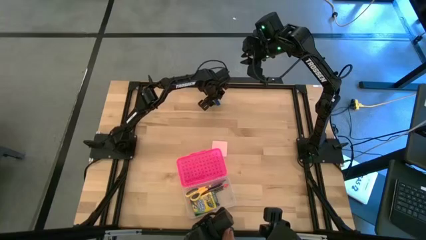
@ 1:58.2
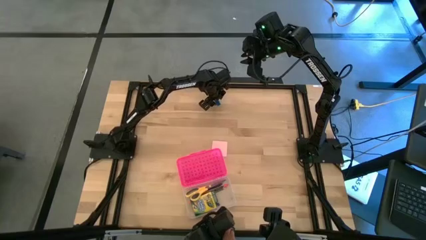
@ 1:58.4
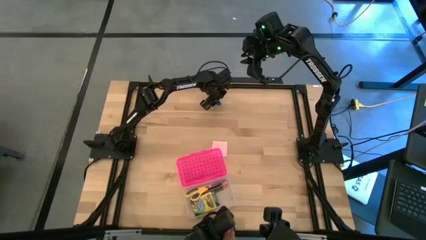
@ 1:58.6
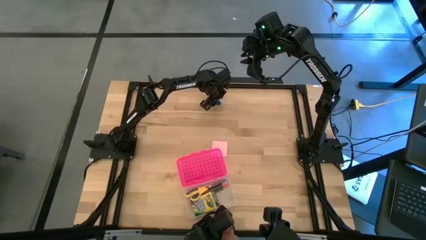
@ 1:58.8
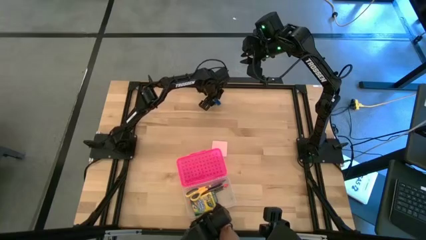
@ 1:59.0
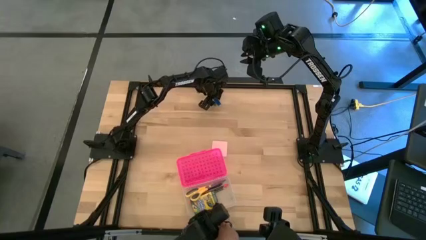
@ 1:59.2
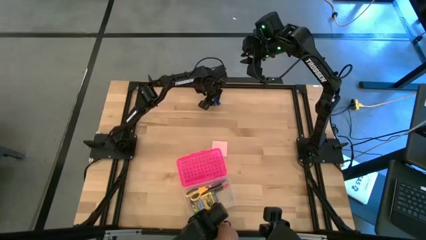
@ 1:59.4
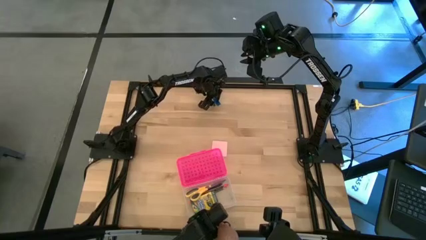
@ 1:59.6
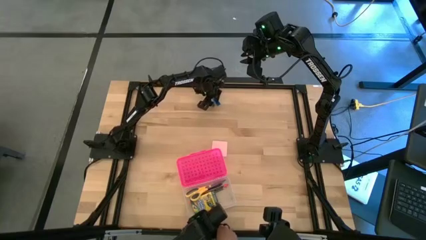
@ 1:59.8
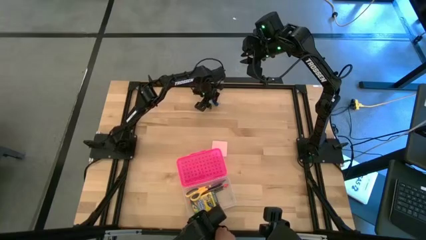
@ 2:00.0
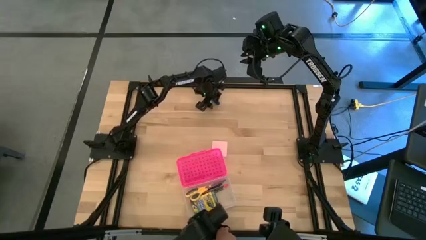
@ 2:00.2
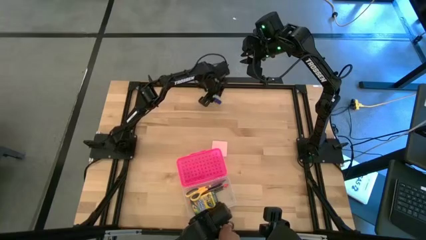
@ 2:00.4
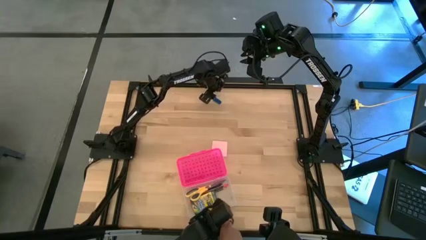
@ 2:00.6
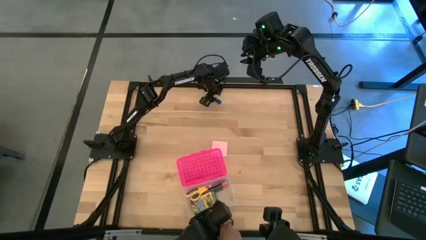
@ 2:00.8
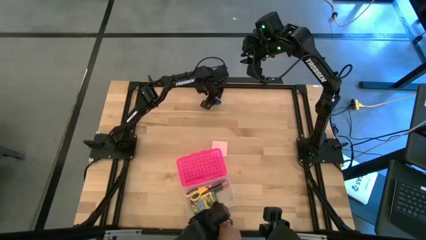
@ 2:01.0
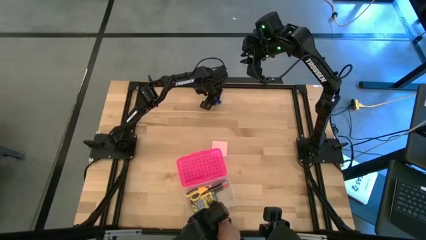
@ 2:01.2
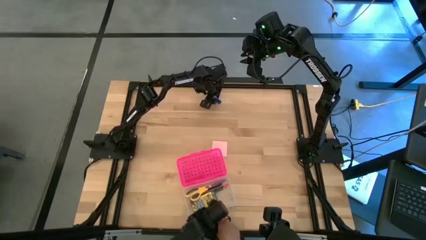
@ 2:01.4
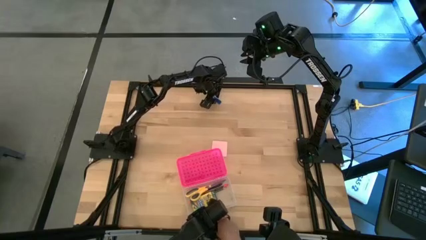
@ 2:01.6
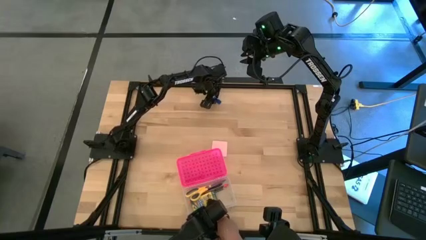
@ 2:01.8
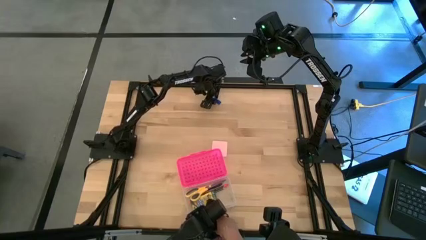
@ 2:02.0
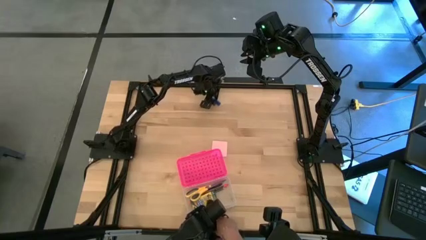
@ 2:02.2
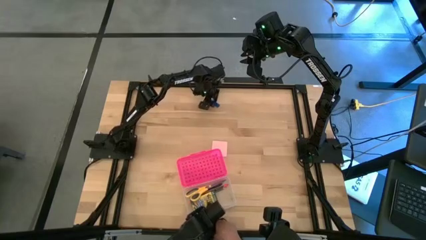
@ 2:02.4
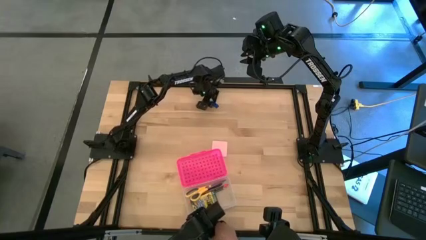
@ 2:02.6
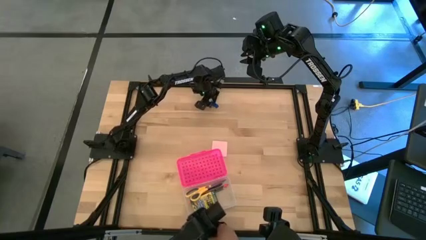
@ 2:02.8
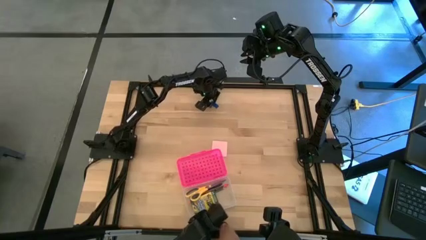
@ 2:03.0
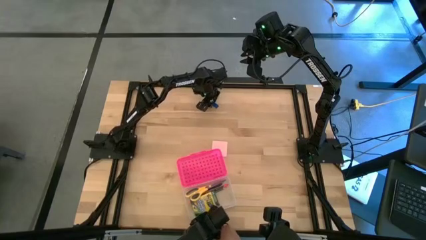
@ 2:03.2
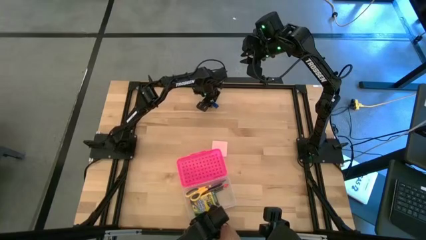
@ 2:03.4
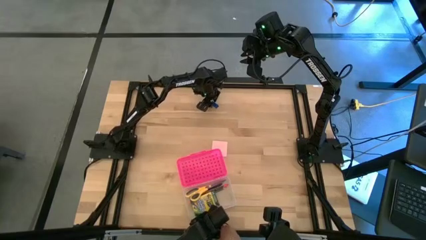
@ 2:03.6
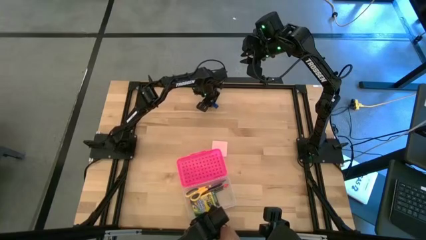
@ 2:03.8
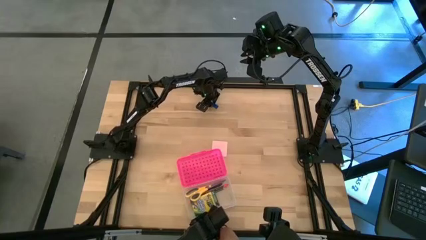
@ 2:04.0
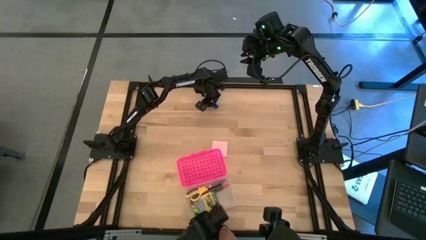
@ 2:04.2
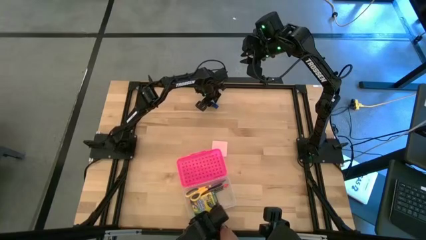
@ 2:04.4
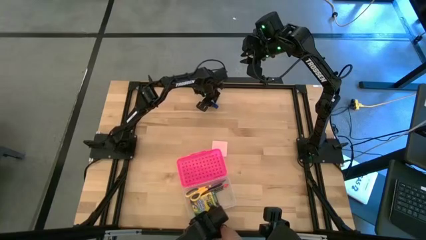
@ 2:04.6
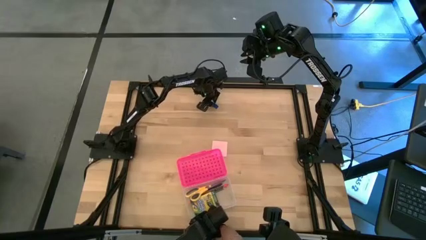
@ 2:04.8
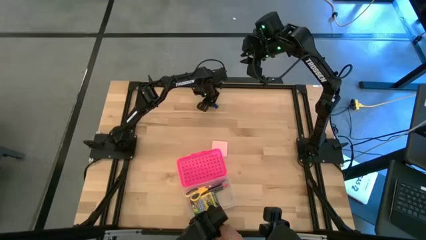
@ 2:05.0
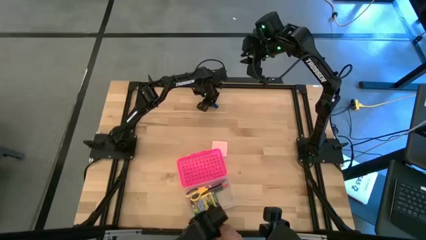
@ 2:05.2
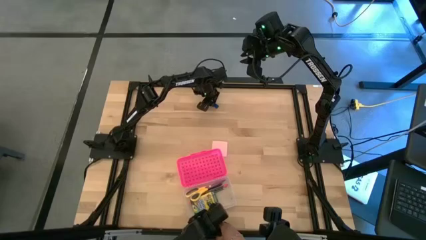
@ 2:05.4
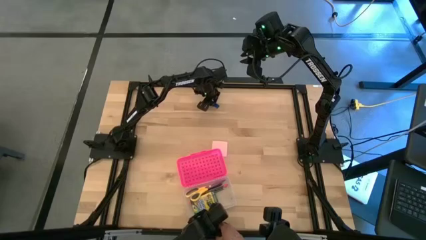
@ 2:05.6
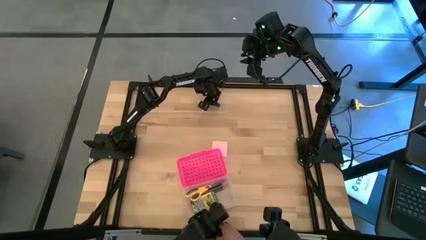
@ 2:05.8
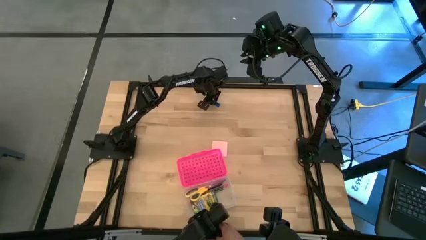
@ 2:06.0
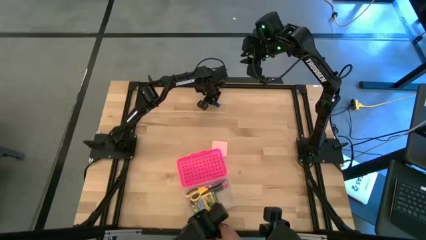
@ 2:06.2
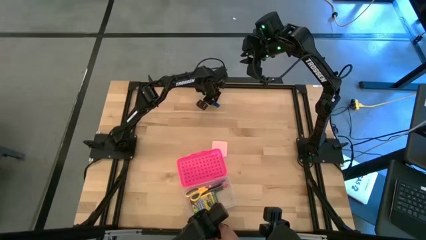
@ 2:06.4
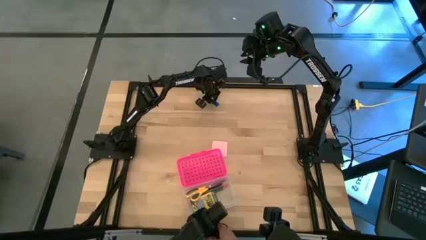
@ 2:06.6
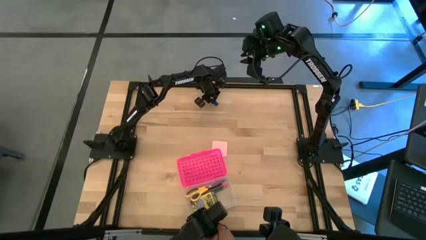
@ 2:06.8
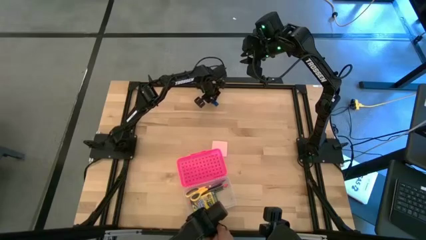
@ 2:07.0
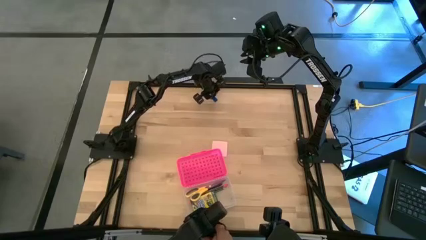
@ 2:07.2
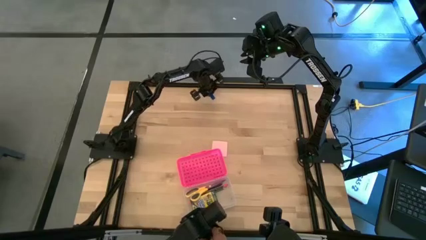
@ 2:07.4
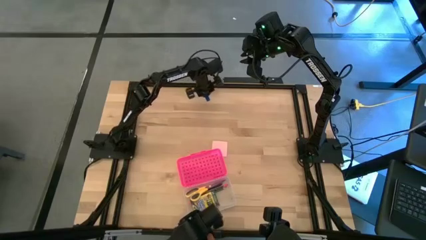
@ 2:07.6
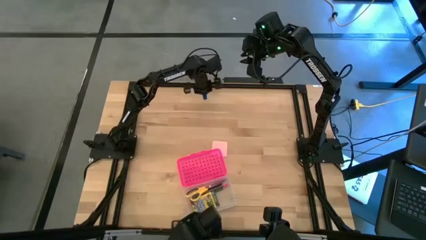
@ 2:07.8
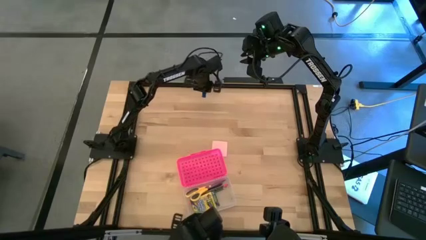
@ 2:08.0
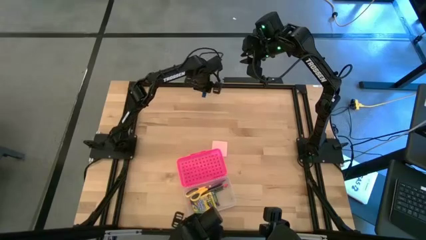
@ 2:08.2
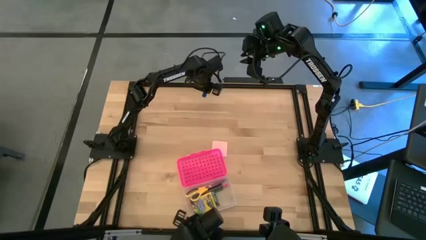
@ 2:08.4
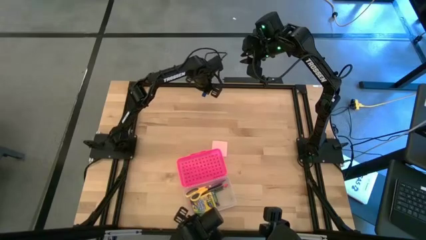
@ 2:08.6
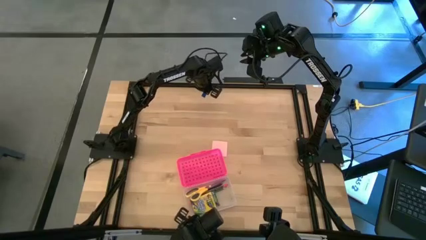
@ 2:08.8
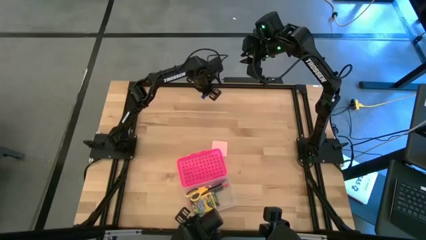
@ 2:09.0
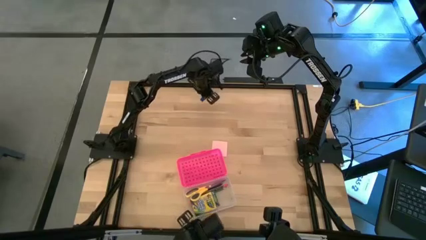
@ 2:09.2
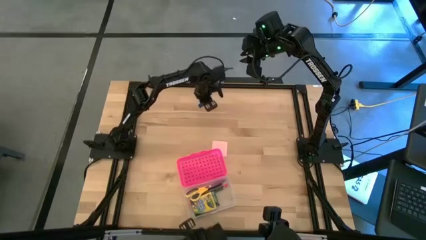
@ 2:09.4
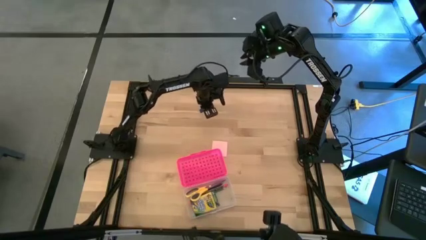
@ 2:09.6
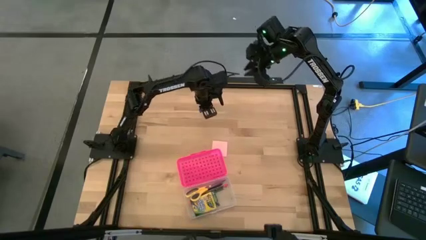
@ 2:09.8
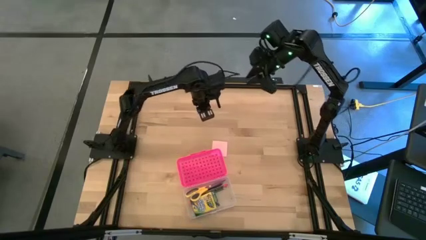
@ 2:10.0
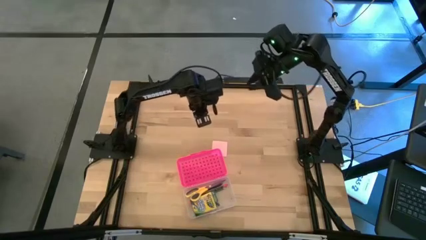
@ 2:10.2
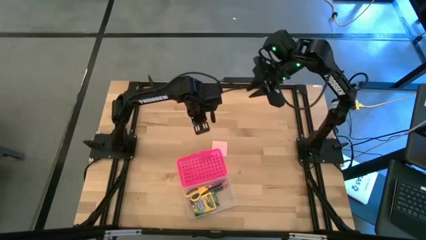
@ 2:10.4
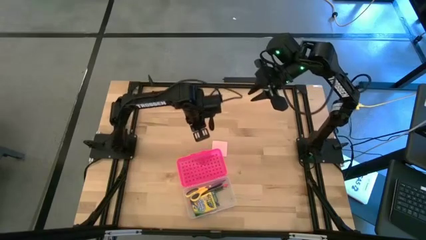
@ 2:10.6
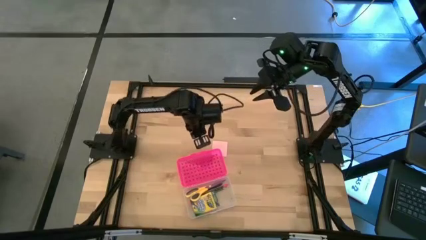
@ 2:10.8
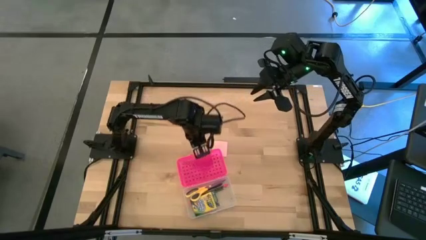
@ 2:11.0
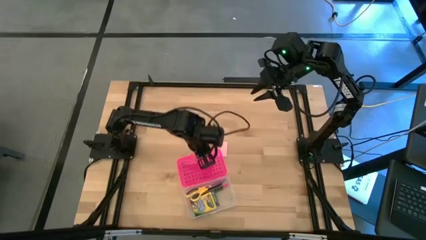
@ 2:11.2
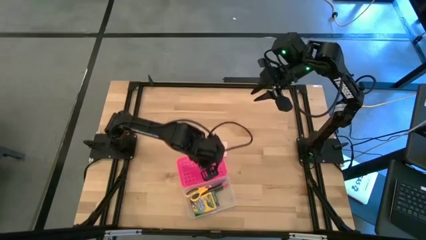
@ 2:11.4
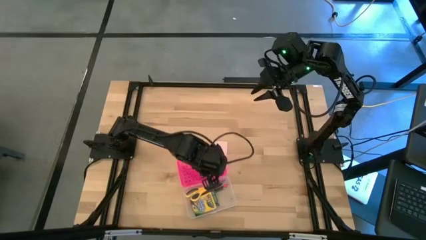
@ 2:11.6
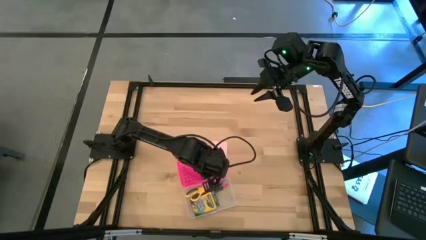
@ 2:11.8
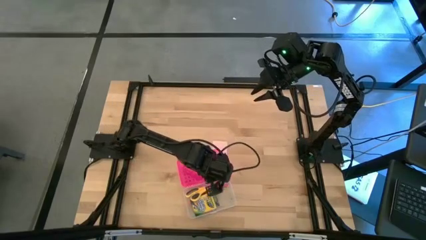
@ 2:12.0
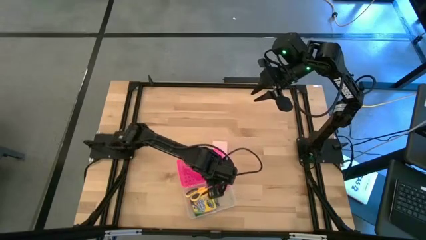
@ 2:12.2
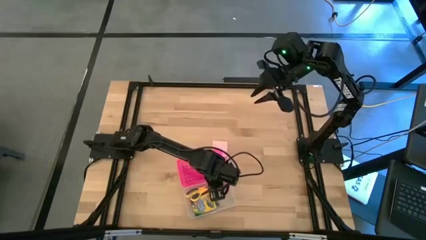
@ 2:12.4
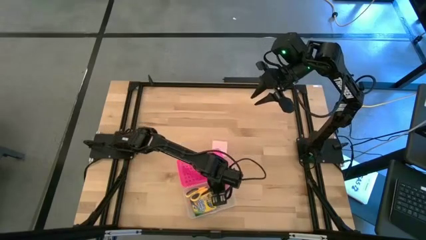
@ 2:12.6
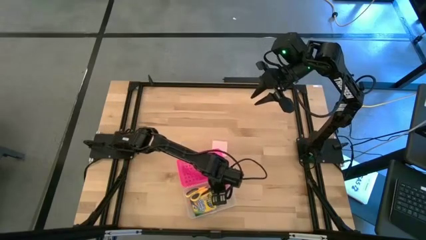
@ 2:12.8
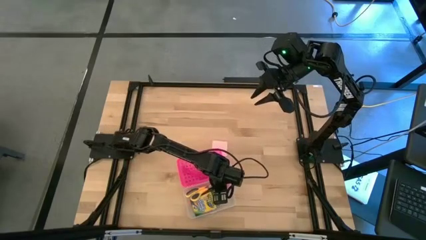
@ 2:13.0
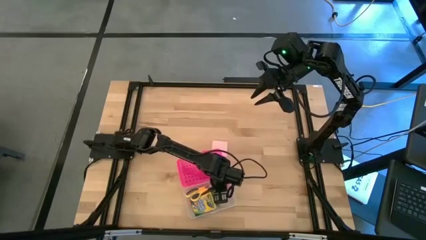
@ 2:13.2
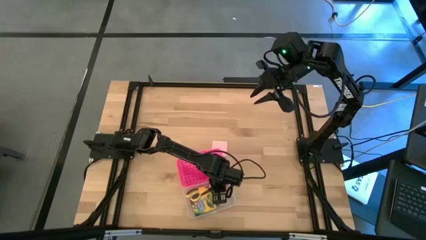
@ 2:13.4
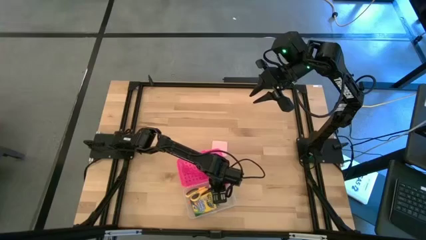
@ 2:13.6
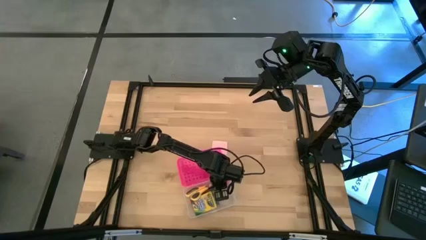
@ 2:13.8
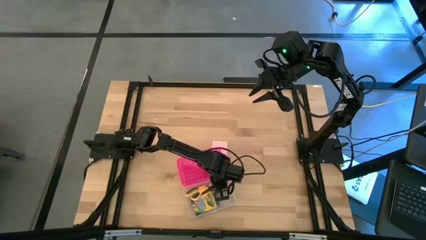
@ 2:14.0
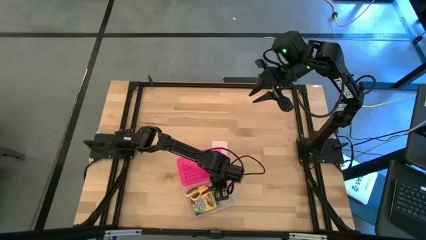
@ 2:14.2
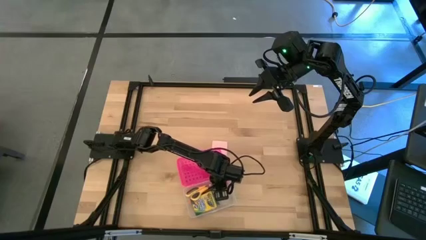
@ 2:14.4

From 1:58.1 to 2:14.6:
Task: Pack school essentials
Put the blue eraser into the pink supply box
